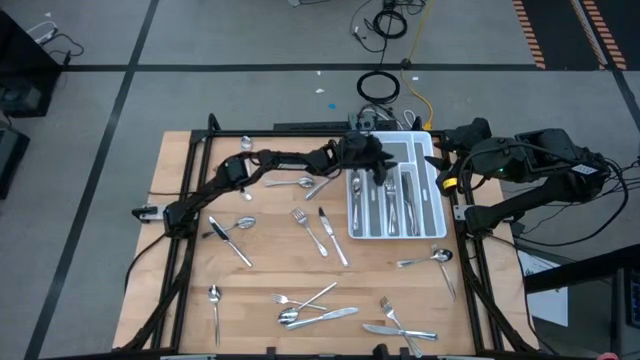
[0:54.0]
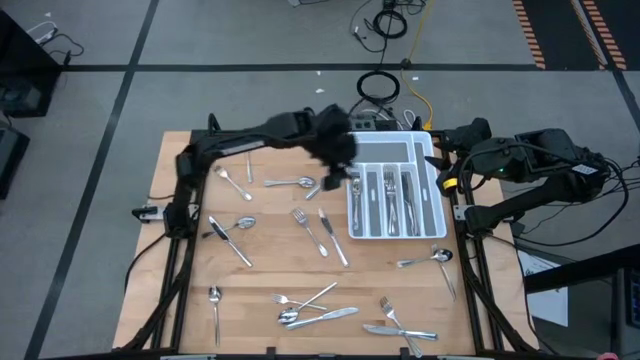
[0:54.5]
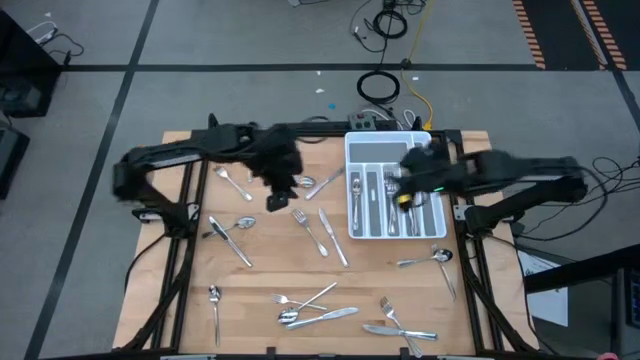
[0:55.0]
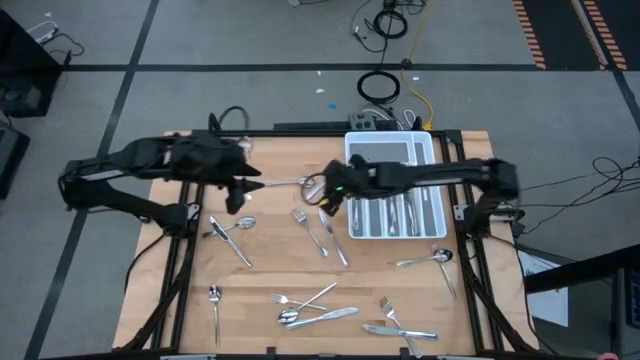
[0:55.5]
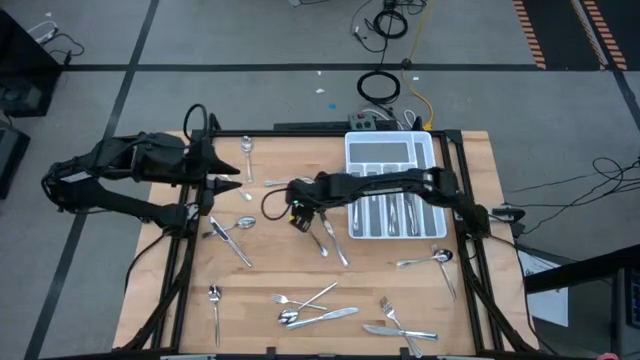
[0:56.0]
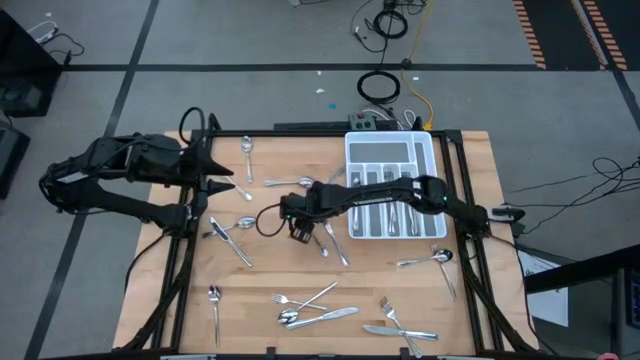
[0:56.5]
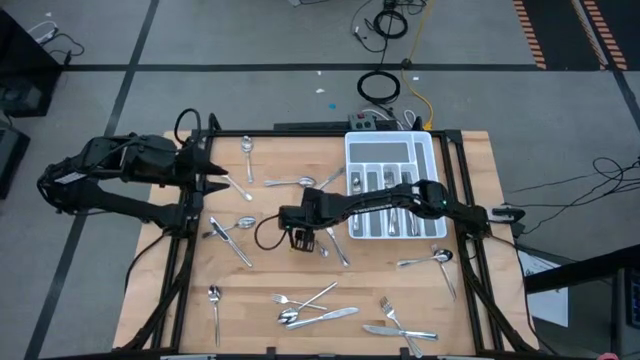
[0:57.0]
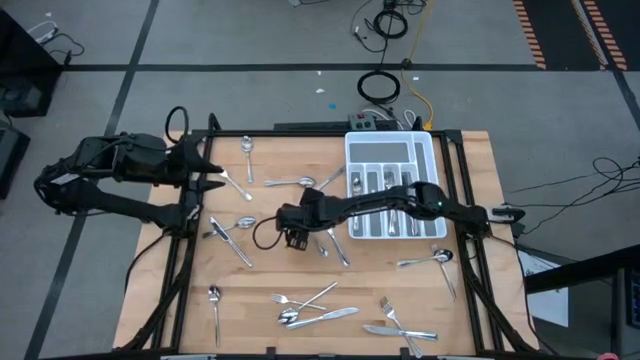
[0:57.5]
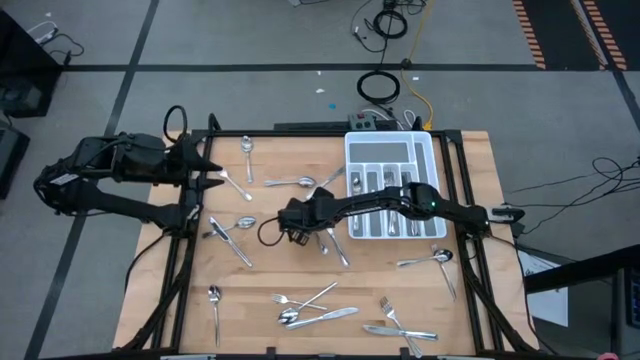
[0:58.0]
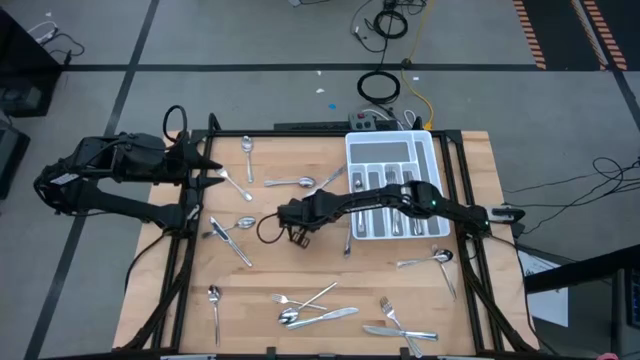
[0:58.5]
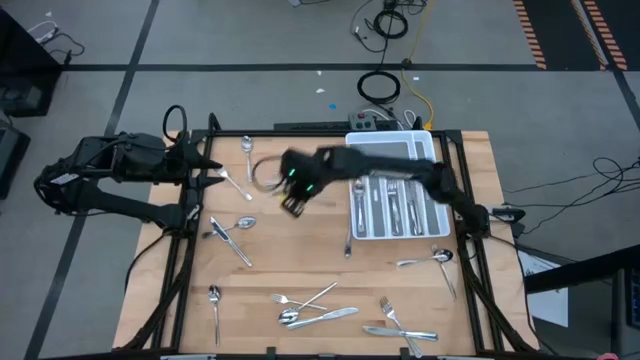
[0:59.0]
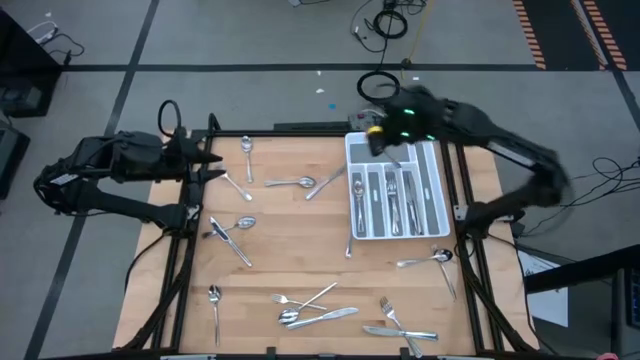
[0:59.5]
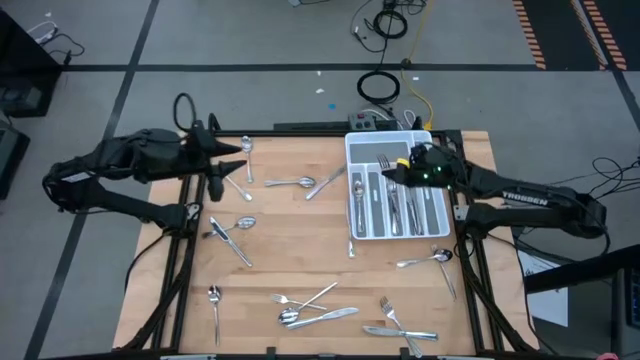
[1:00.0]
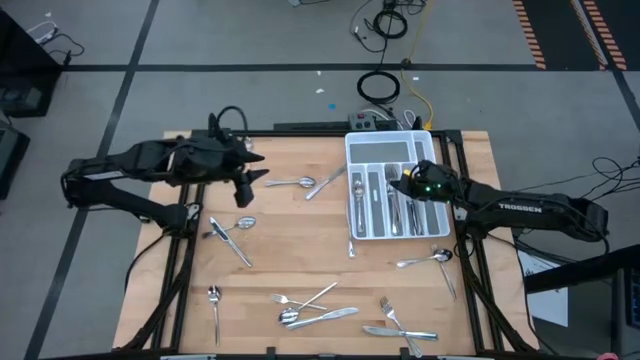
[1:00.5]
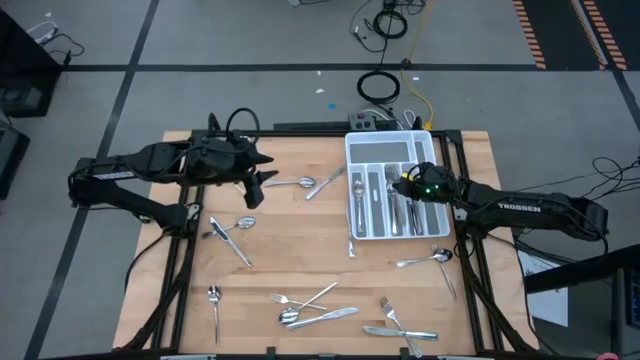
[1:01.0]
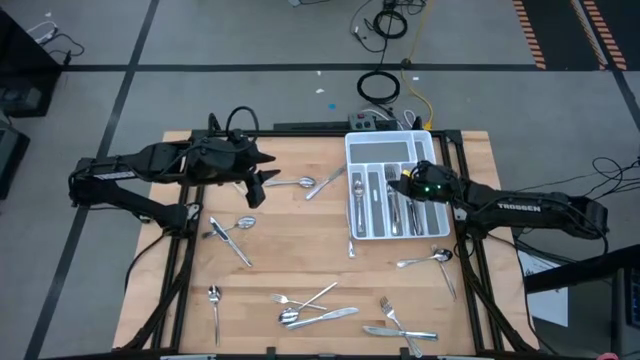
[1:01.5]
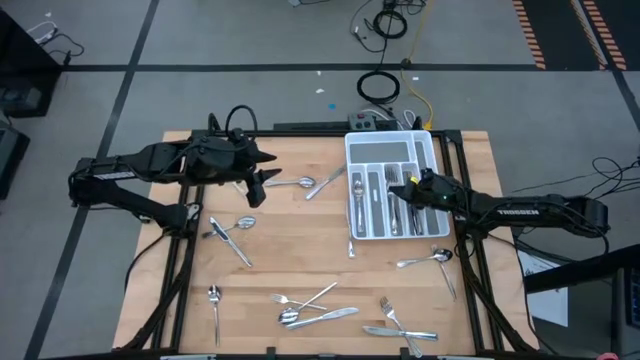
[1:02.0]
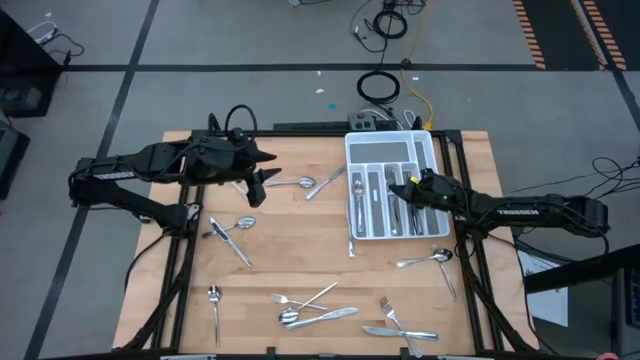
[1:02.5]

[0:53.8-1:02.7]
Task: Sort silverware
Put the silver fork into the white silverware tray

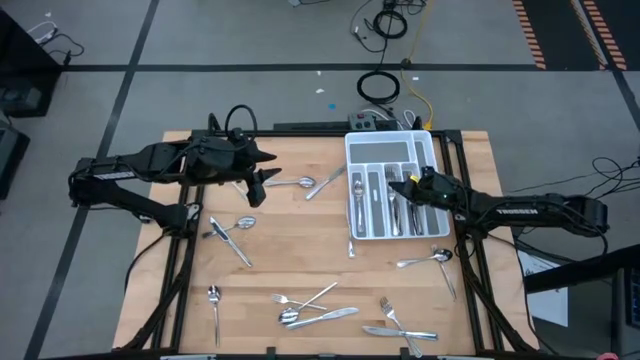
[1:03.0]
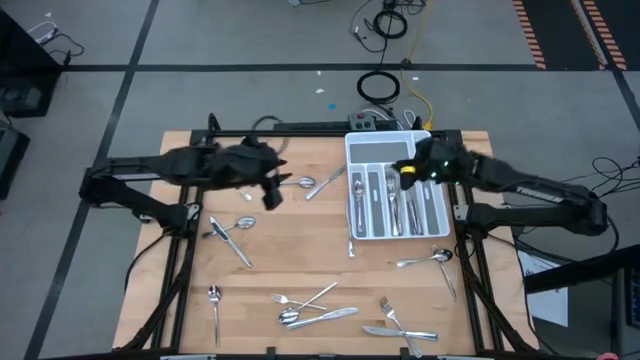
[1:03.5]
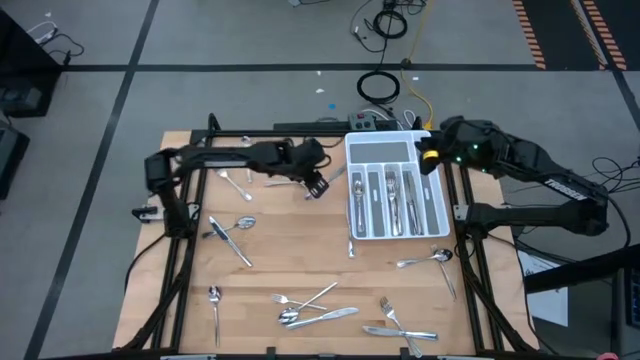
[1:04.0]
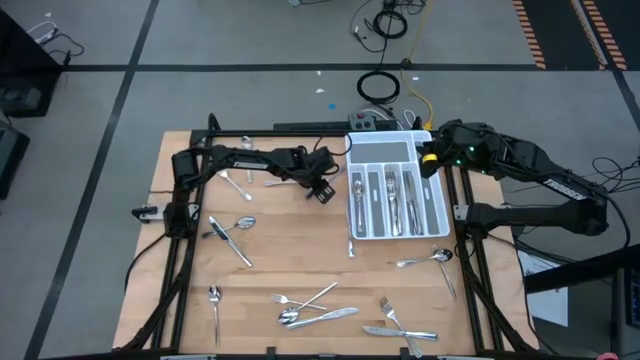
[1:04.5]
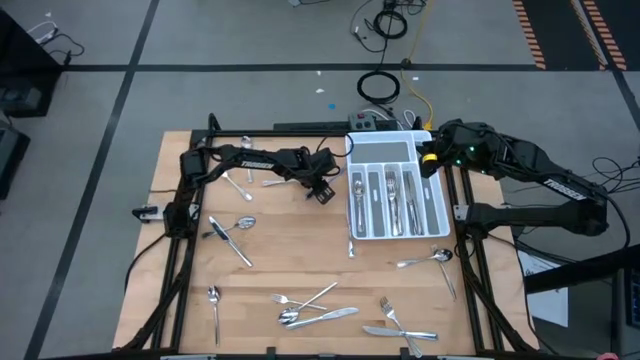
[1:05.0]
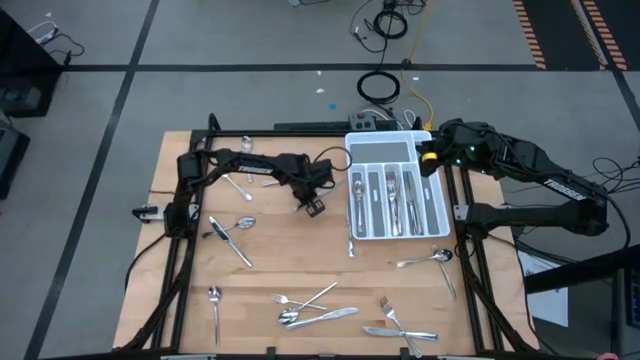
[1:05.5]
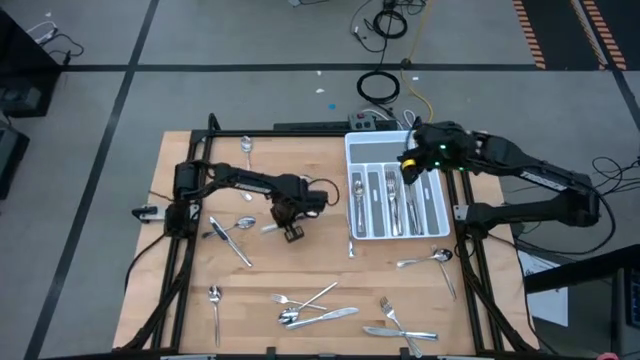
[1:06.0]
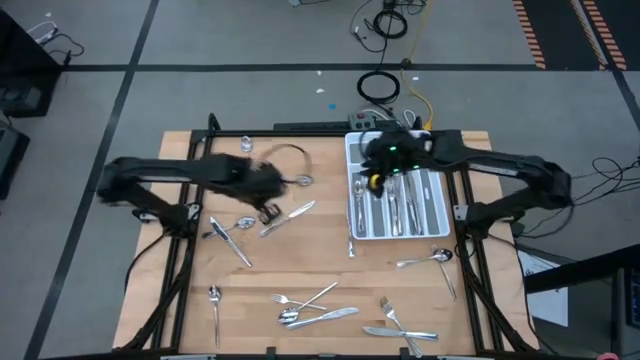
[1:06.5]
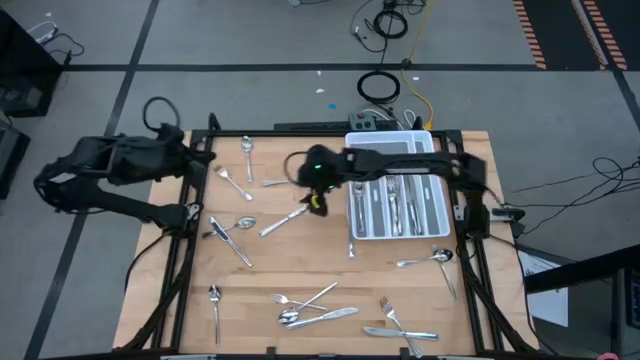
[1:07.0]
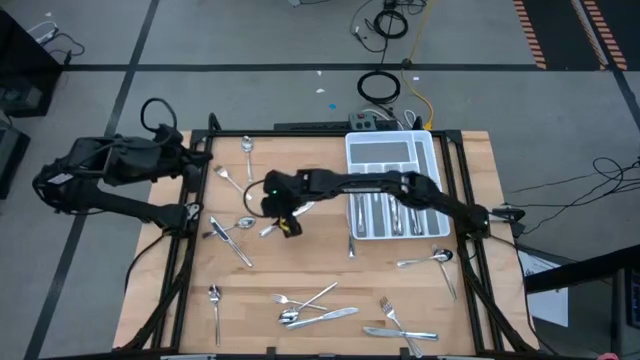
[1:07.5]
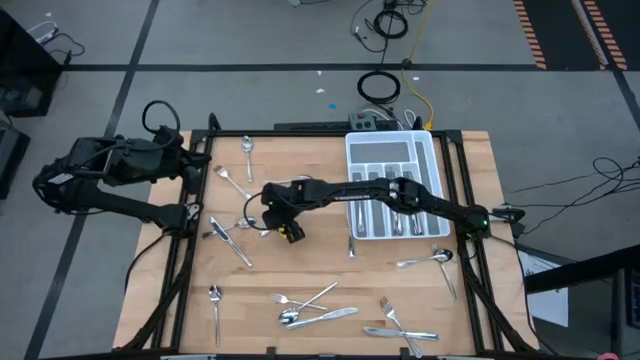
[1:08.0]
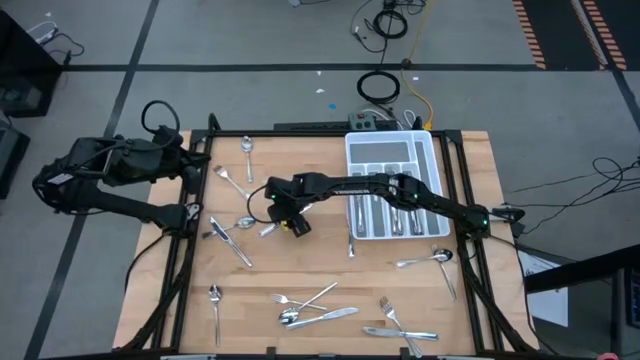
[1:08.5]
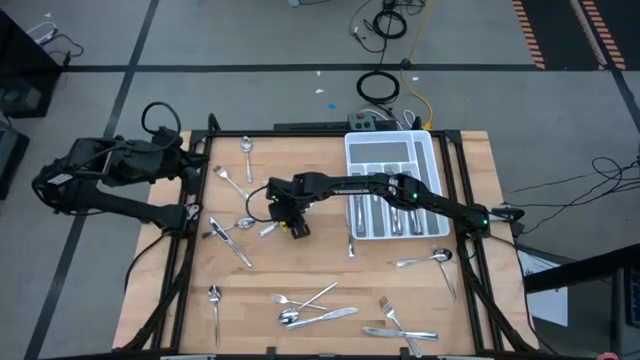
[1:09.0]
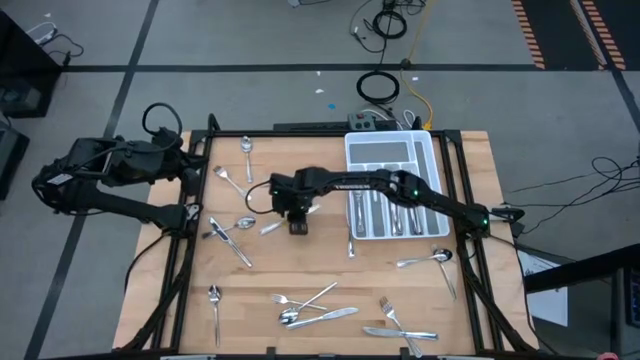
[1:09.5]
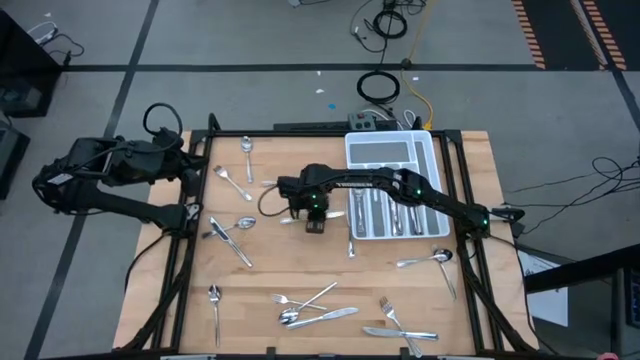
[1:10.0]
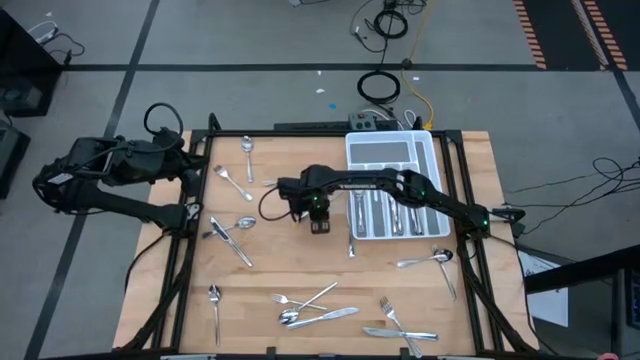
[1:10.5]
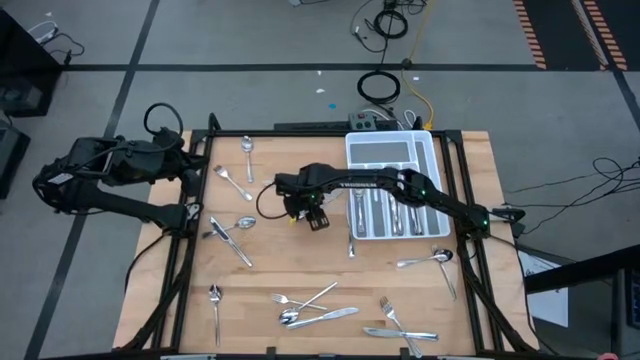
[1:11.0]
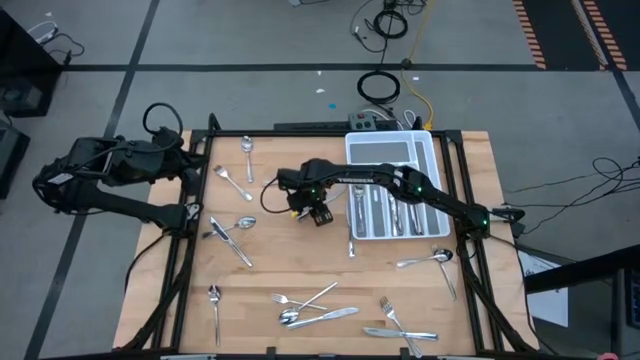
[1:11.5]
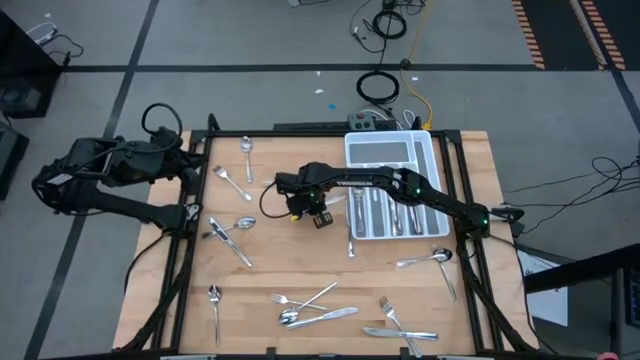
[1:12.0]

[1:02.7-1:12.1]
Put the silver knife into the white silverware tray

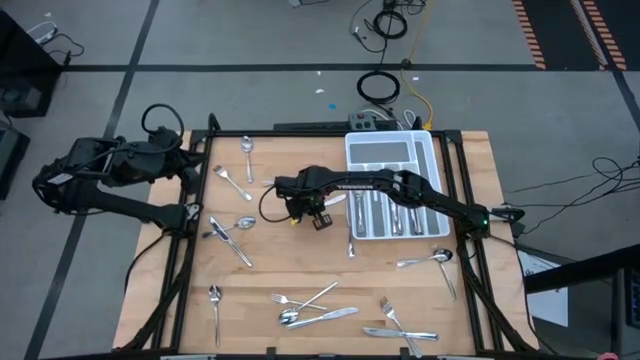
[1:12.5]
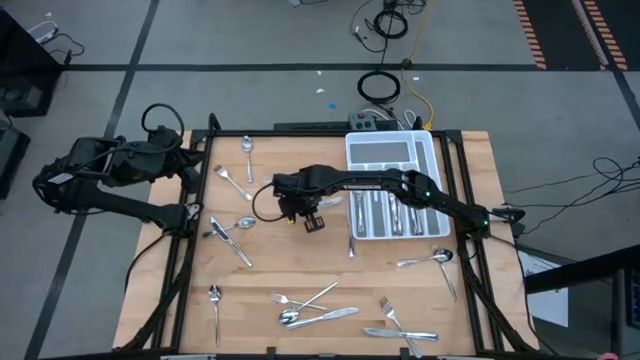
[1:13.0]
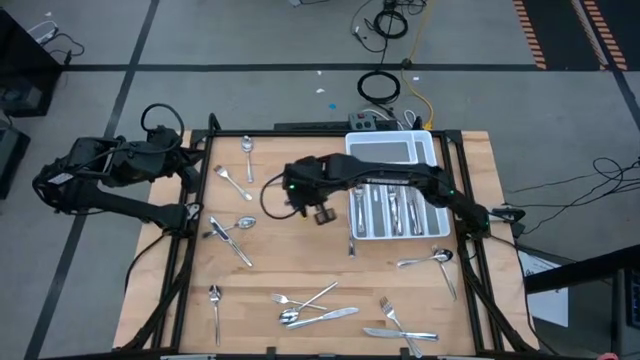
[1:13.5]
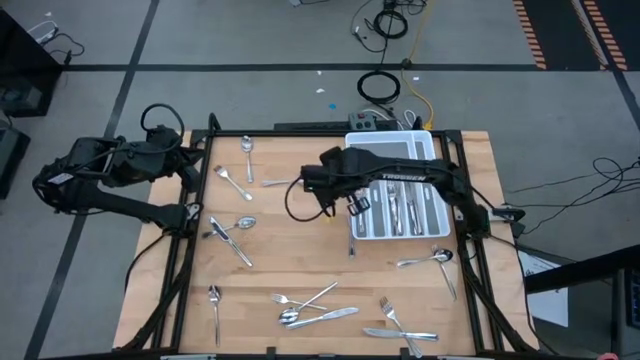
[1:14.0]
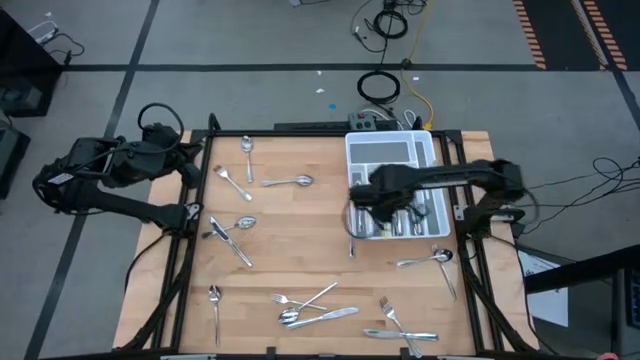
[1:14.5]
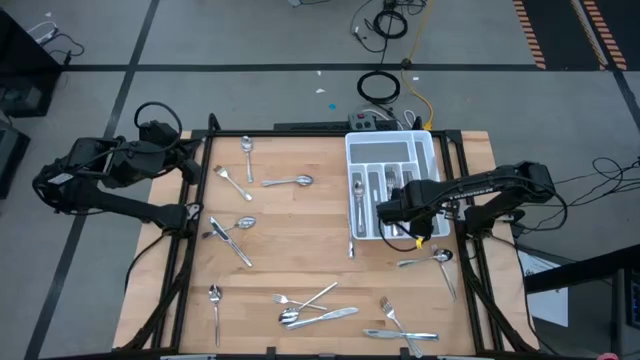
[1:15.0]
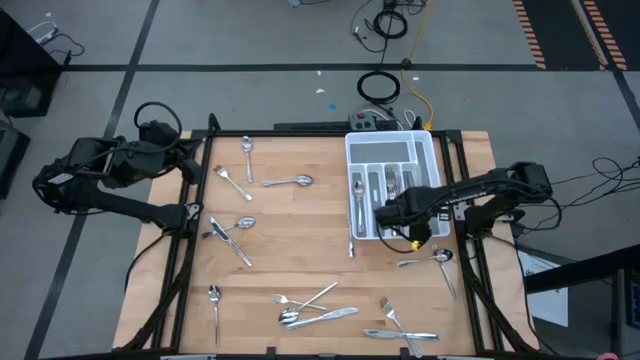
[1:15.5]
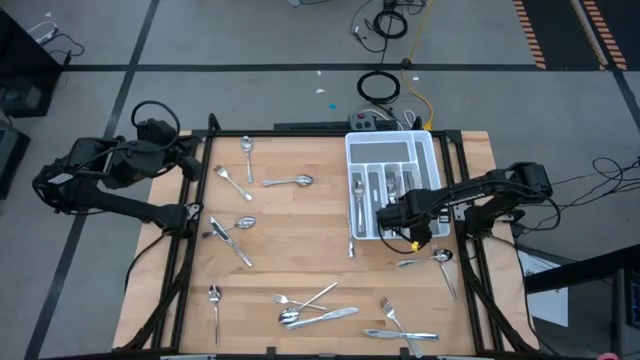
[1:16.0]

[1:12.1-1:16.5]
Put the silver knife into the white silverware tray
